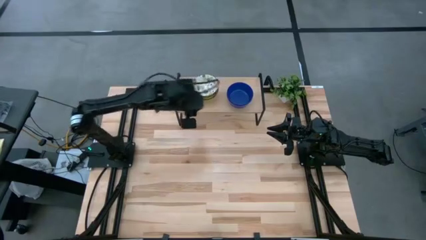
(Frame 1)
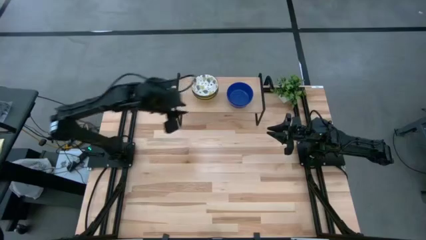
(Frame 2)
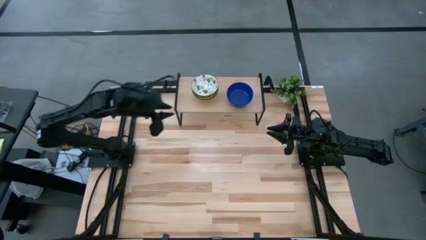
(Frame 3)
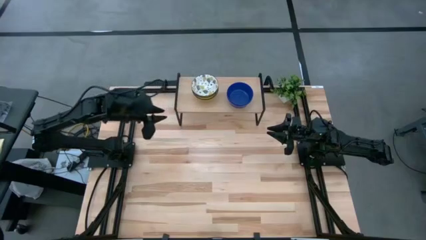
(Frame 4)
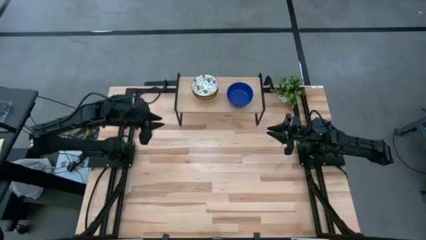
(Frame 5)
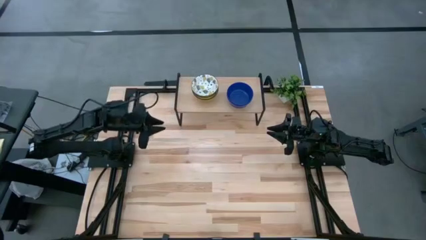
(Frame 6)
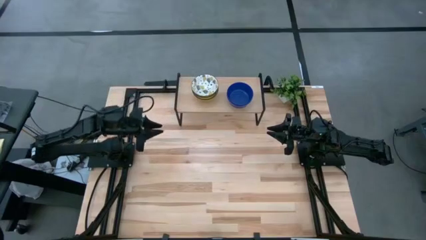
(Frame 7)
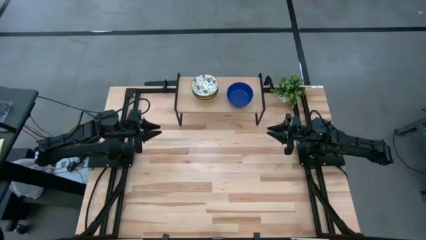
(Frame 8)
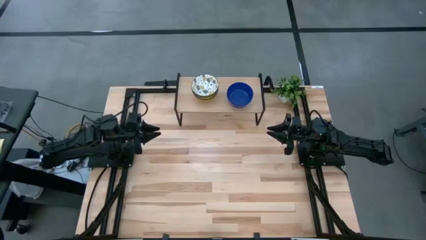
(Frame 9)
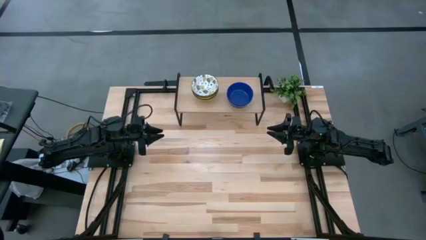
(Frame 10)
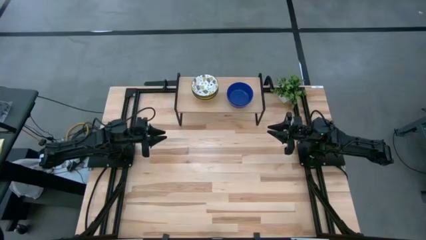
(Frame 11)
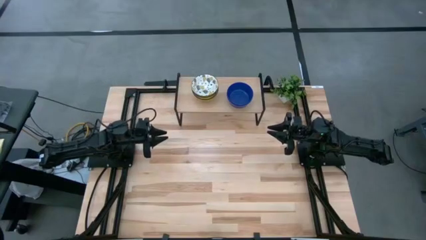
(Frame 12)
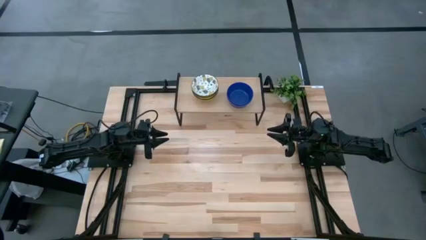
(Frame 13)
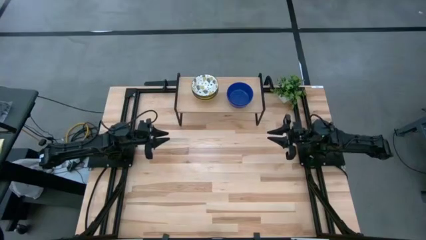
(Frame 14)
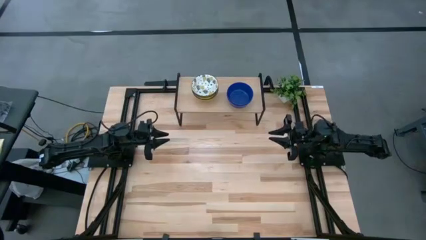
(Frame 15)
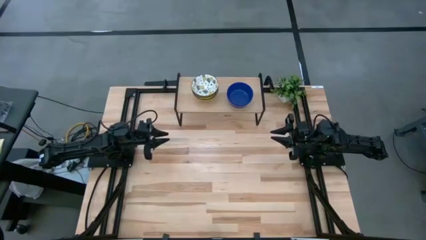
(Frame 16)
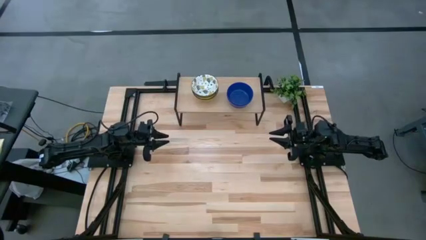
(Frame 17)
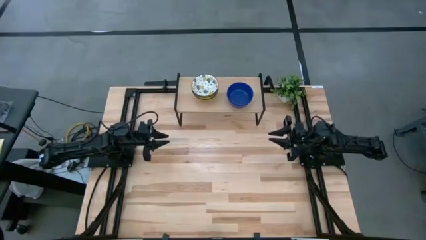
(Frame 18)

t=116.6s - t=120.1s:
Task: Pick & Place Mini bowls
Return to Home Position

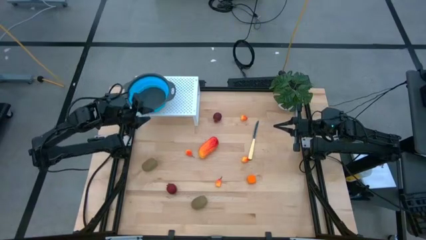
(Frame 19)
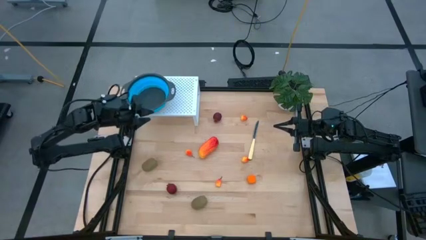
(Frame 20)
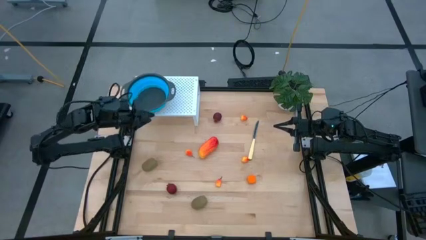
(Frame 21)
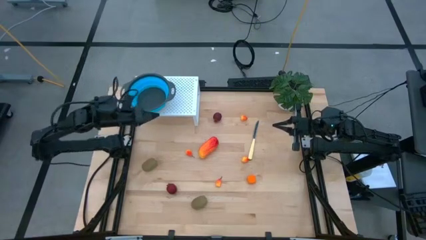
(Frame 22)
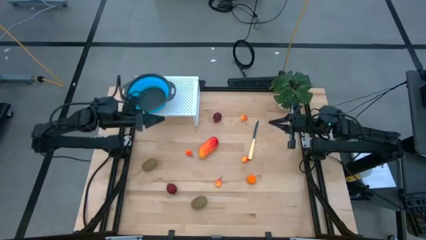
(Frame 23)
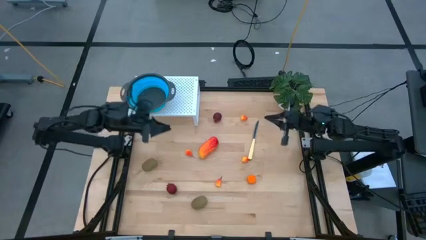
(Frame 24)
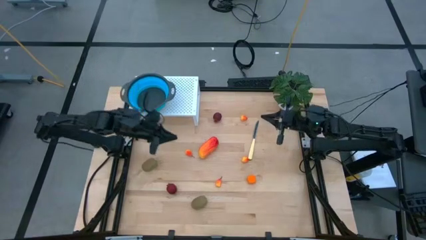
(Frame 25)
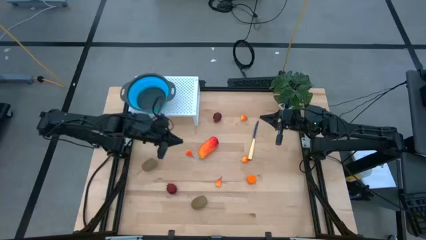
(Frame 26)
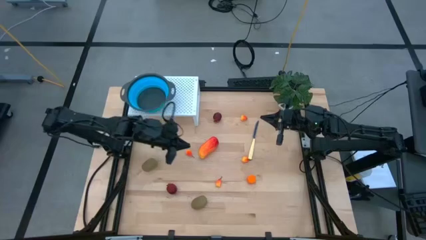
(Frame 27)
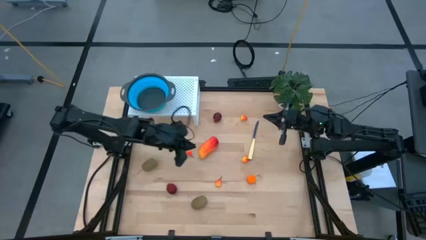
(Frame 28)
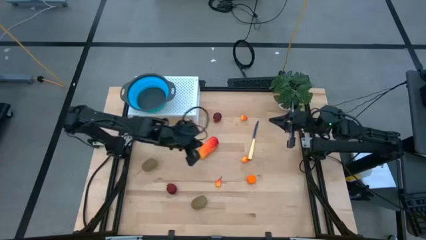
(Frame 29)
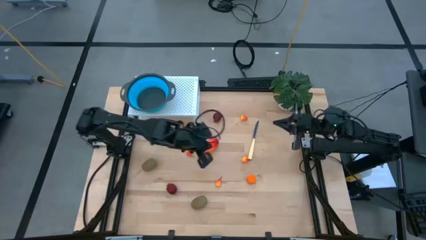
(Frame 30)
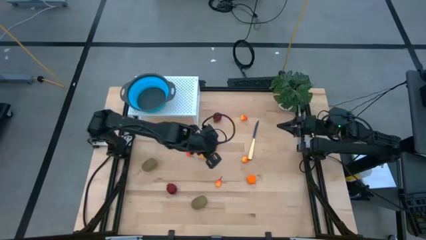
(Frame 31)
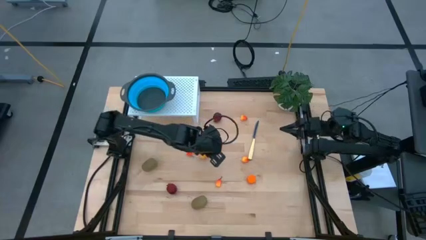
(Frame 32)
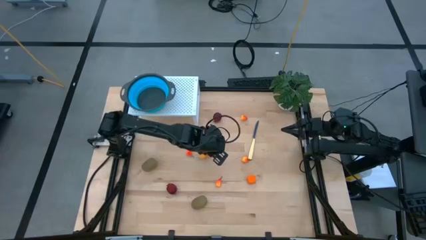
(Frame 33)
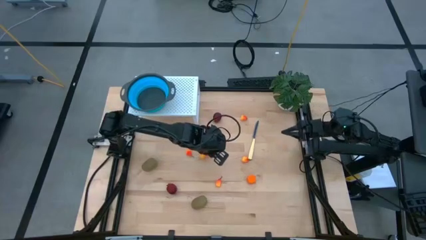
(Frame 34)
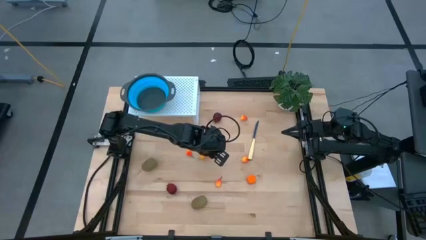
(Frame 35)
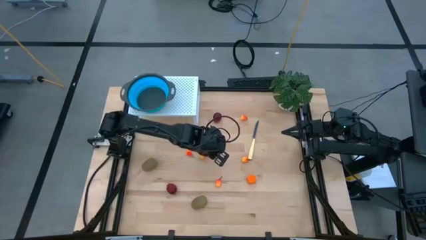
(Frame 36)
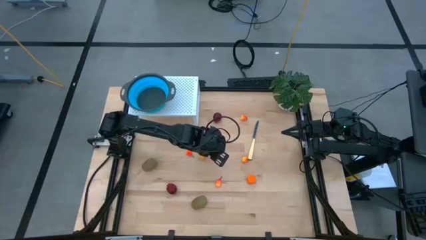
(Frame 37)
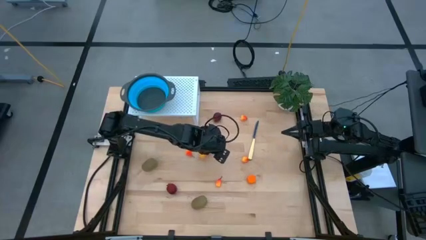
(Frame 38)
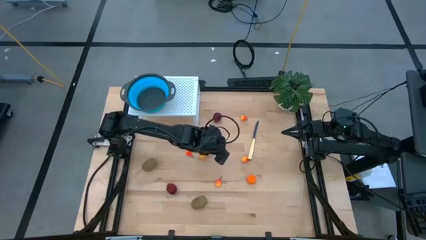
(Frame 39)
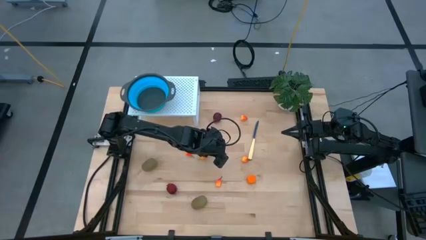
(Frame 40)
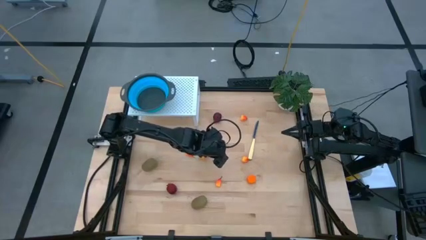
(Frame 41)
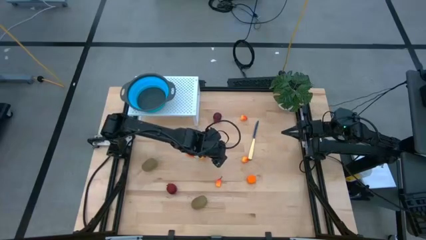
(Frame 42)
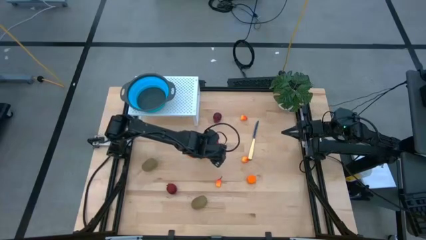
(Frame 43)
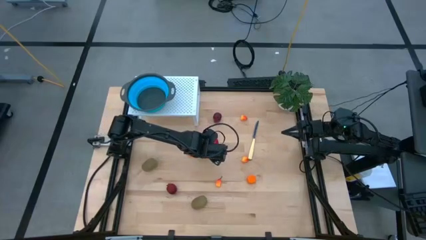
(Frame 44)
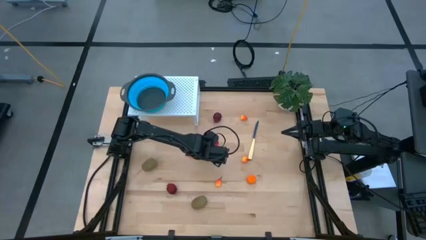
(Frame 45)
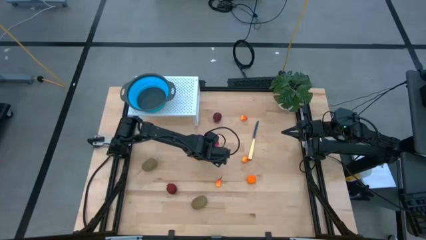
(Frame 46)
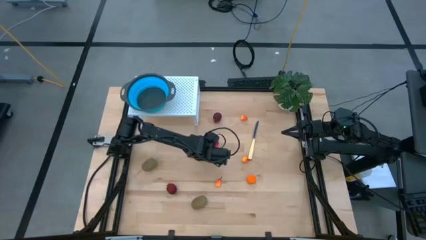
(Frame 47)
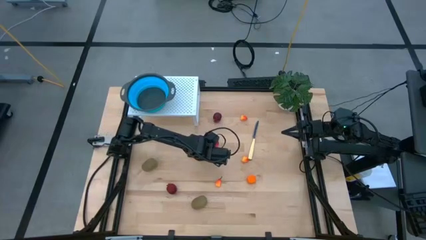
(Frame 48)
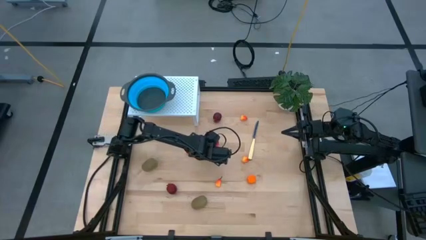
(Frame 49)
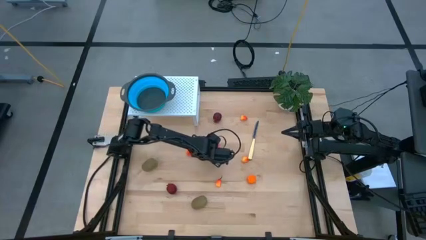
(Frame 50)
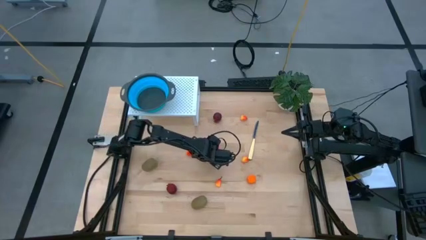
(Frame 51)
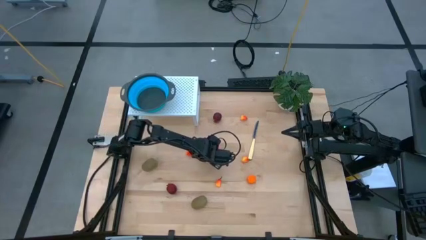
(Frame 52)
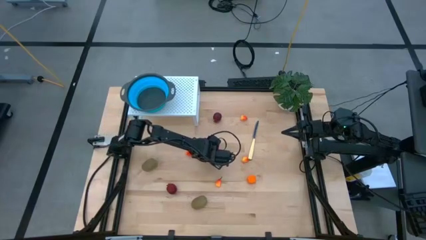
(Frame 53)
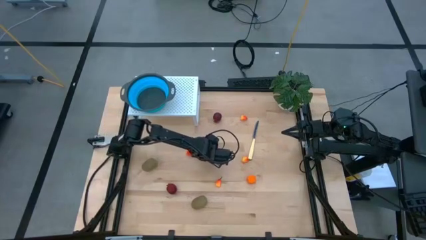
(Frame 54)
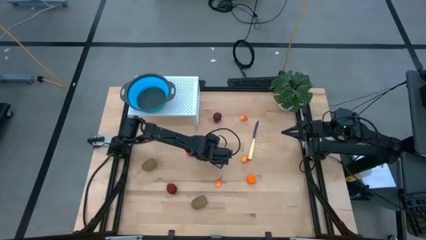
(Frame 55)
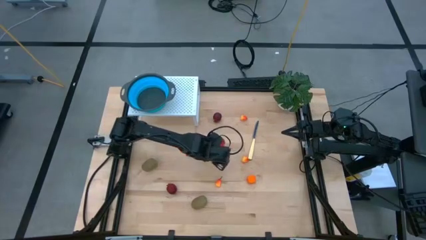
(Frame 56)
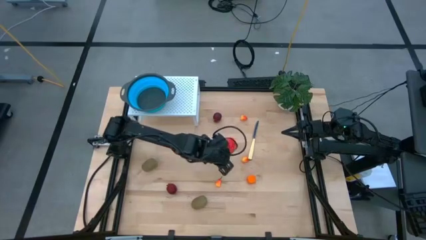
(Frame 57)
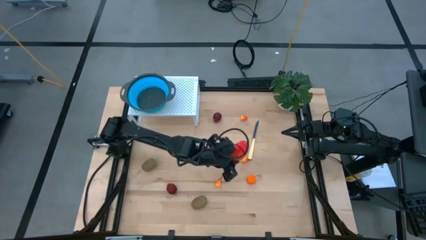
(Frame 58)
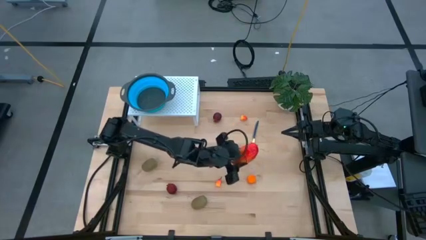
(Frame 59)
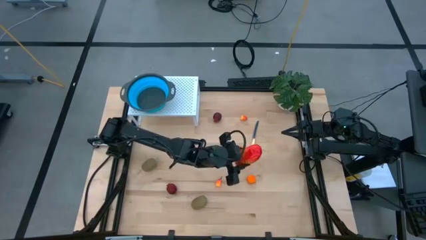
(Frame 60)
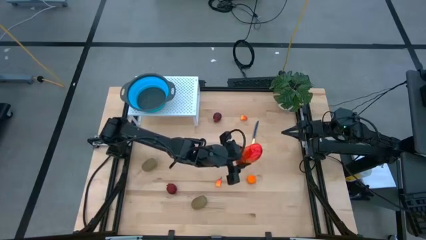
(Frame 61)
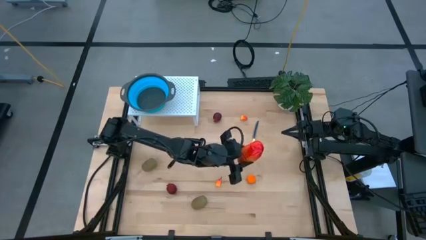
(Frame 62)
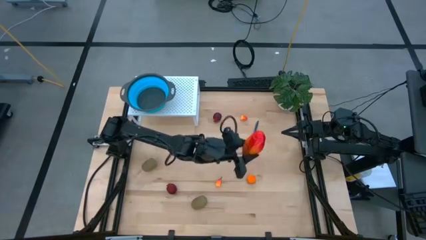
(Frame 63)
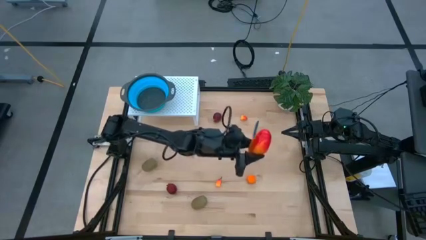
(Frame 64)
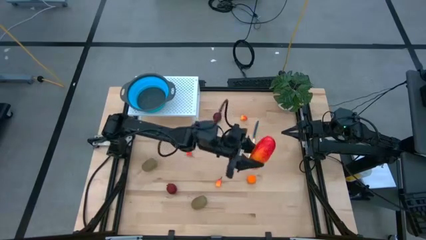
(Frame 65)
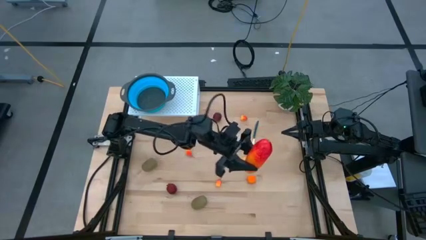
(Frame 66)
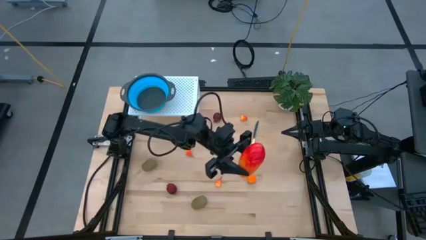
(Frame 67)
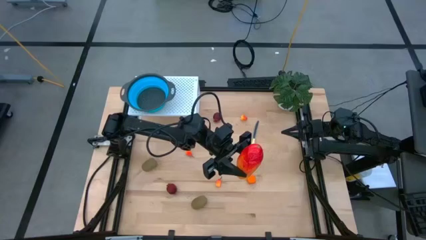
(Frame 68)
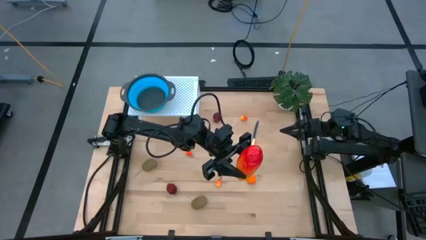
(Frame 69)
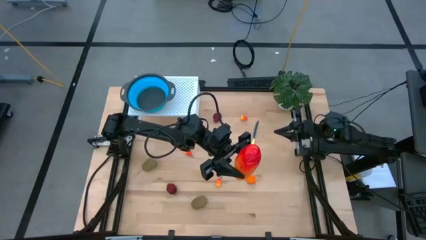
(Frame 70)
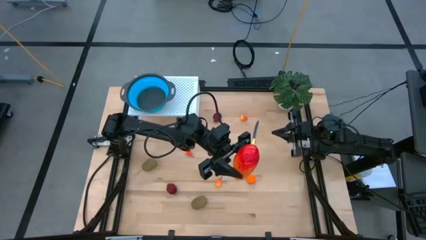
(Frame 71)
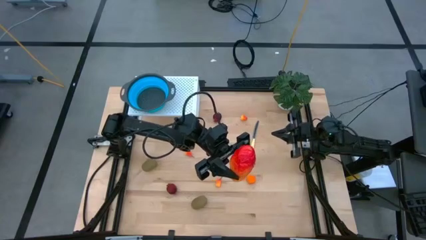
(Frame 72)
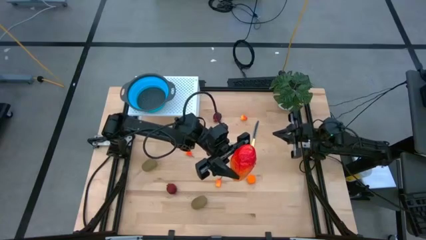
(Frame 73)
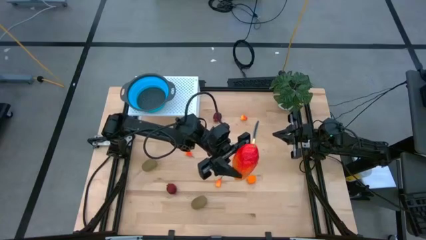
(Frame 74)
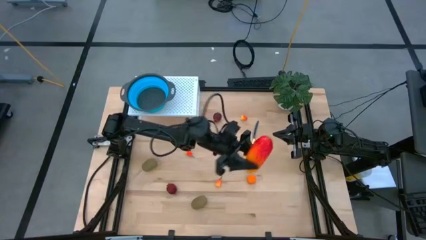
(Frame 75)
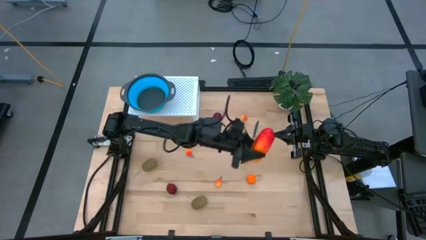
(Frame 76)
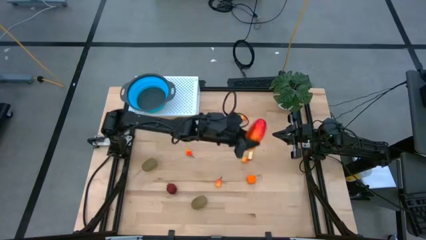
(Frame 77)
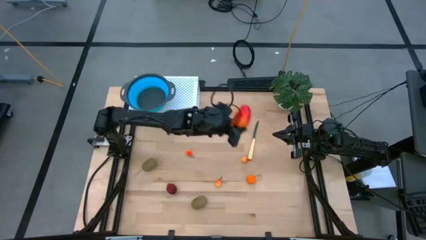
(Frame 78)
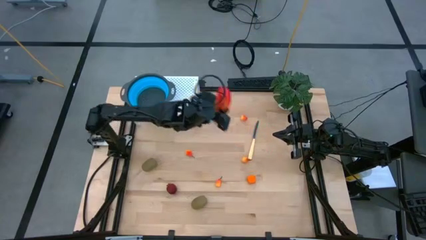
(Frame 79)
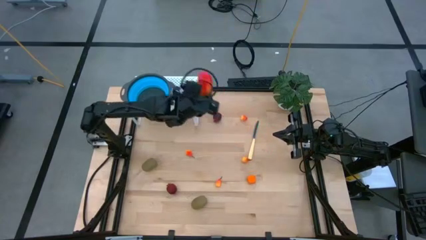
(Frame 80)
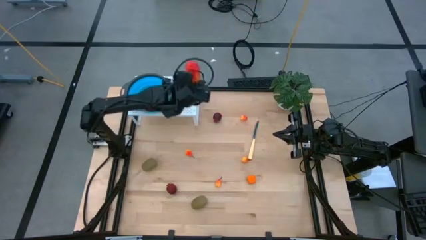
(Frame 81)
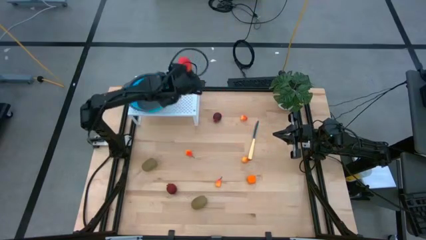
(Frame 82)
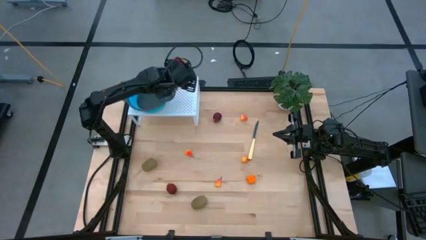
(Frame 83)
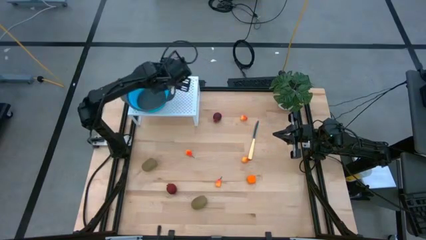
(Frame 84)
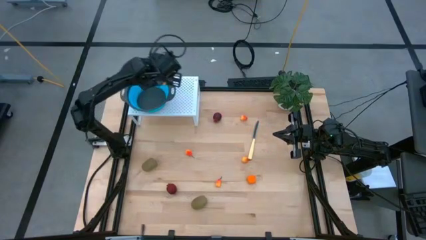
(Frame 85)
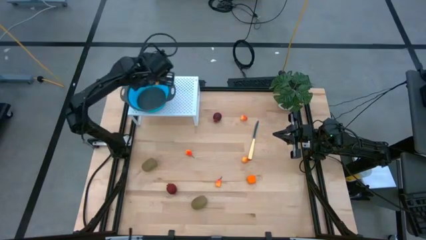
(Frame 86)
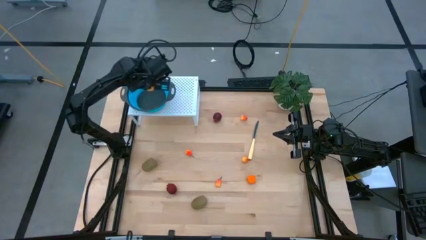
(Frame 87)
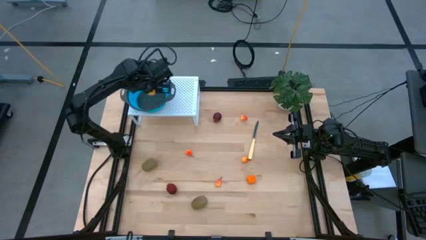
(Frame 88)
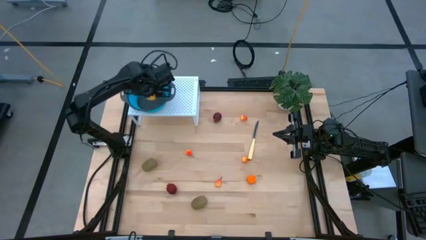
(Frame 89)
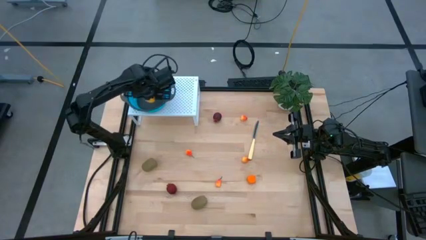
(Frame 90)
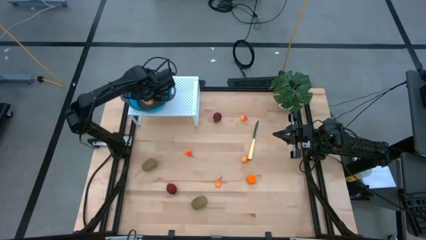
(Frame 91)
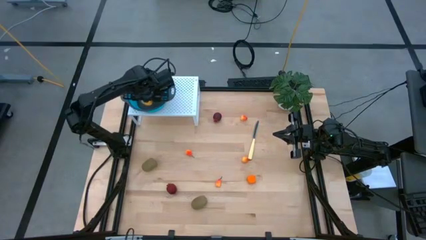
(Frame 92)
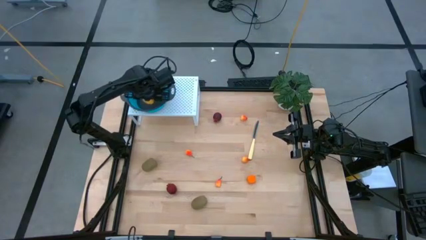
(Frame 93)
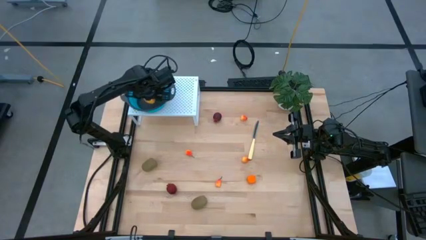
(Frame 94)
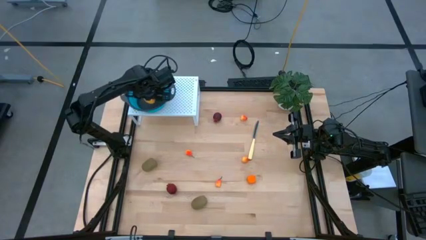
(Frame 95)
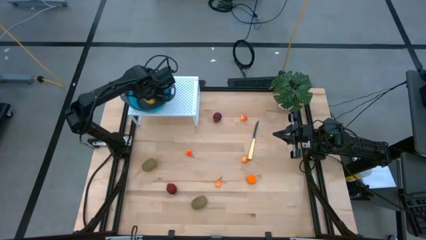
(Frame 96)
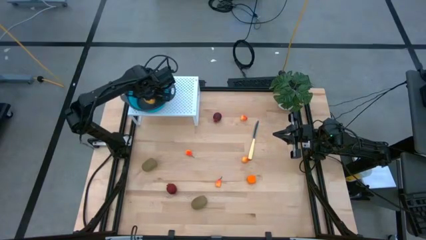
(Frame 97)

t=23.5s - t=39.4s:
Task: Pick & Place Fruit
Put the orange mango into the blue strainer bowl on the shelf
